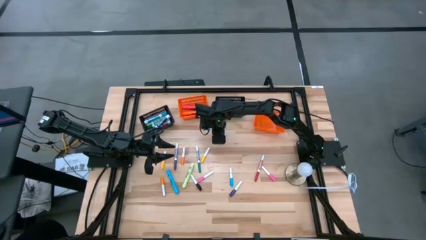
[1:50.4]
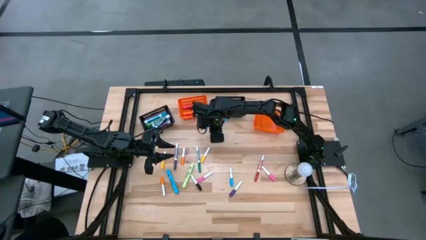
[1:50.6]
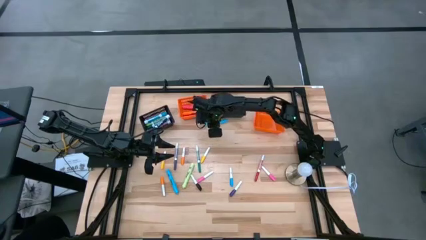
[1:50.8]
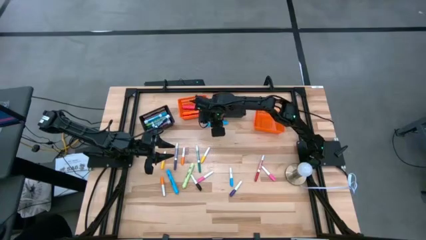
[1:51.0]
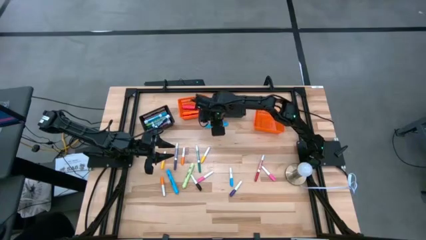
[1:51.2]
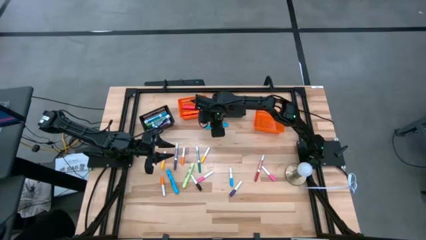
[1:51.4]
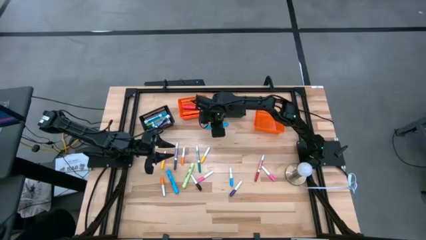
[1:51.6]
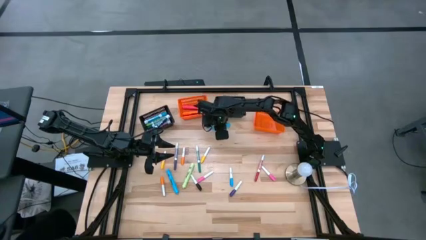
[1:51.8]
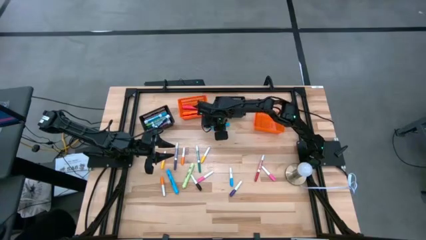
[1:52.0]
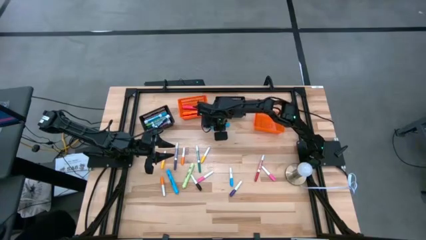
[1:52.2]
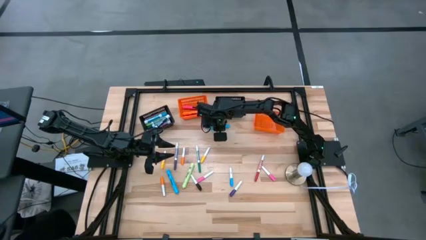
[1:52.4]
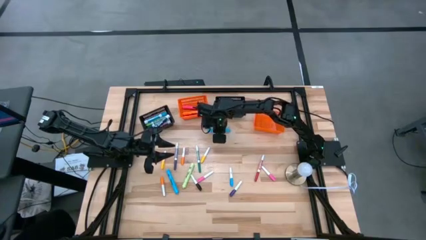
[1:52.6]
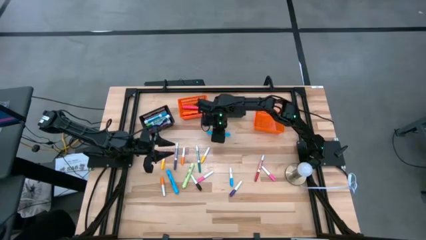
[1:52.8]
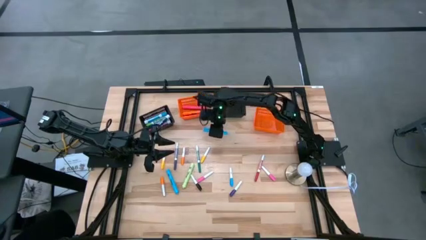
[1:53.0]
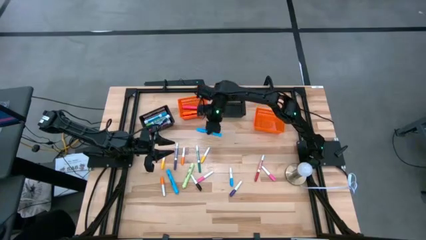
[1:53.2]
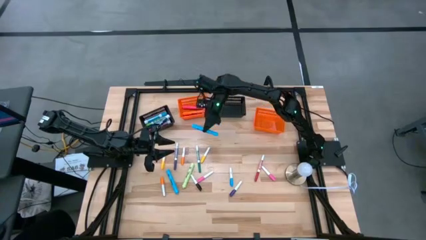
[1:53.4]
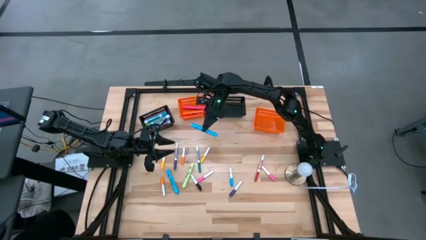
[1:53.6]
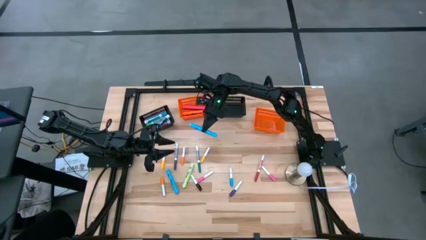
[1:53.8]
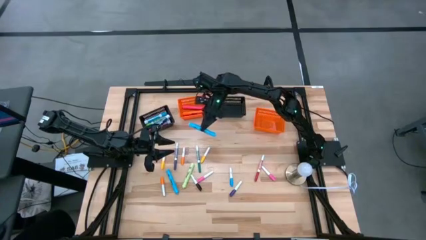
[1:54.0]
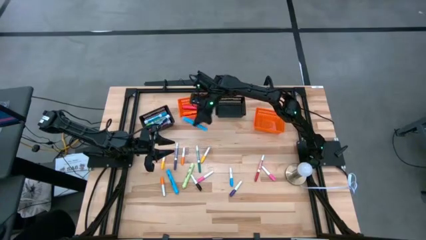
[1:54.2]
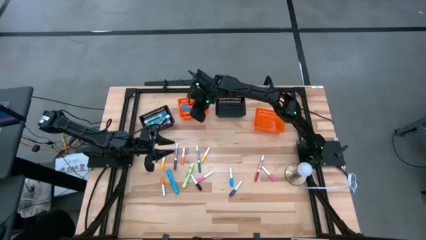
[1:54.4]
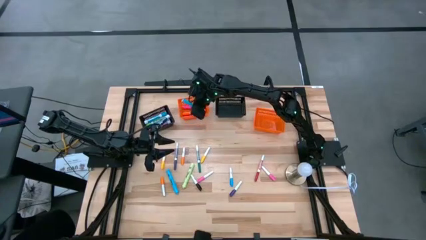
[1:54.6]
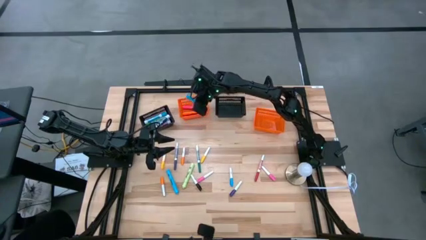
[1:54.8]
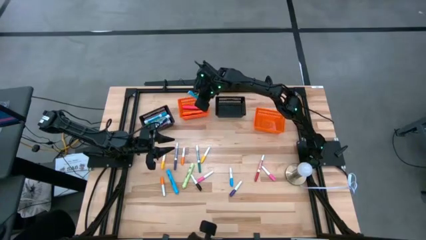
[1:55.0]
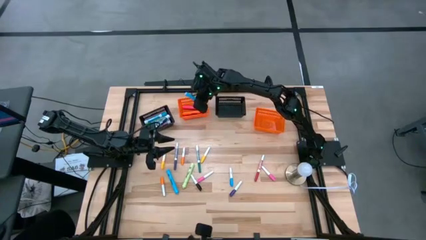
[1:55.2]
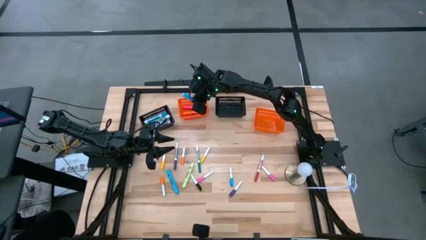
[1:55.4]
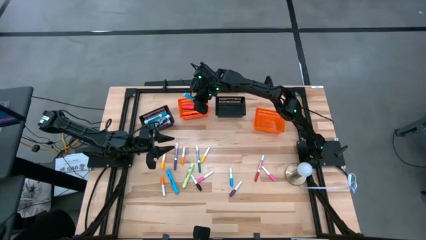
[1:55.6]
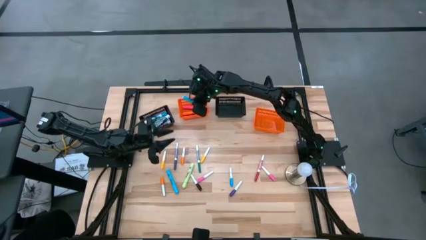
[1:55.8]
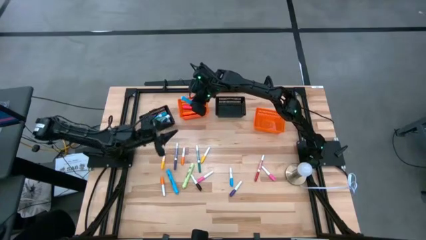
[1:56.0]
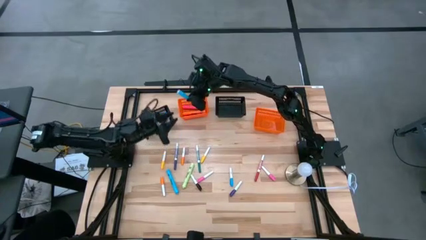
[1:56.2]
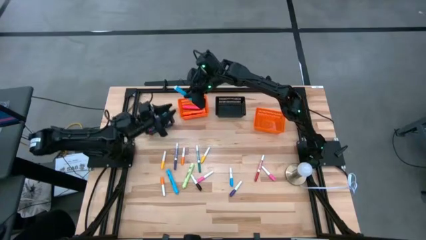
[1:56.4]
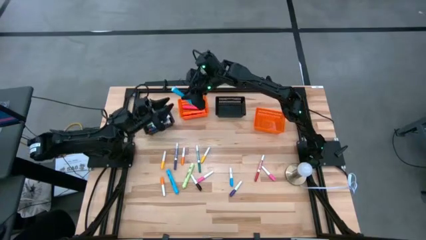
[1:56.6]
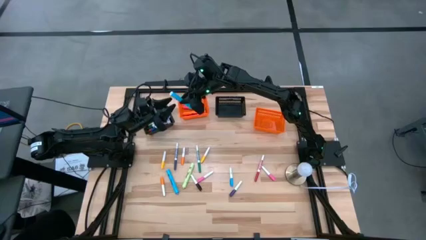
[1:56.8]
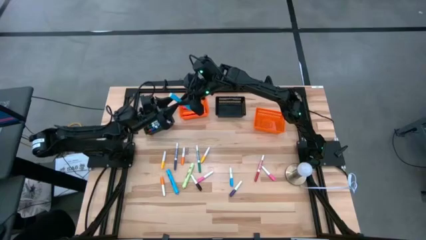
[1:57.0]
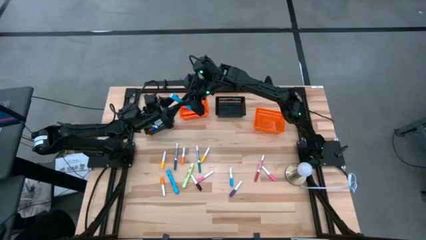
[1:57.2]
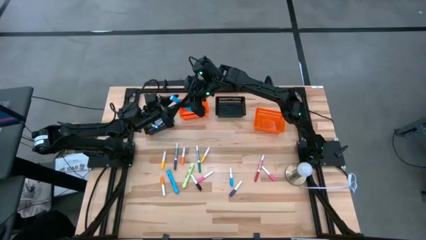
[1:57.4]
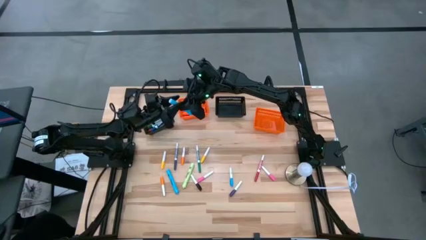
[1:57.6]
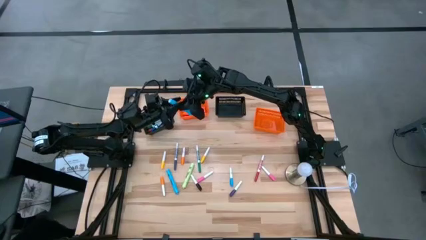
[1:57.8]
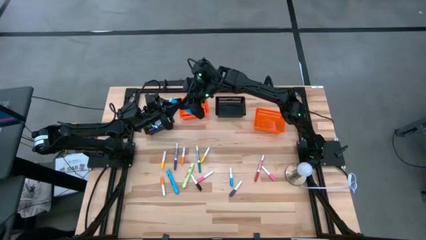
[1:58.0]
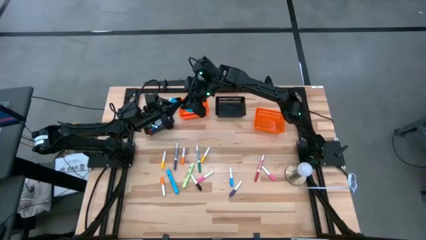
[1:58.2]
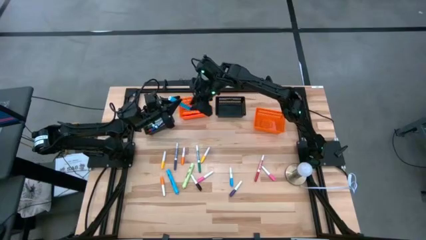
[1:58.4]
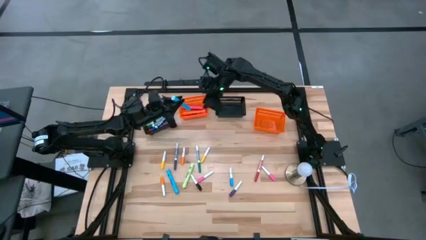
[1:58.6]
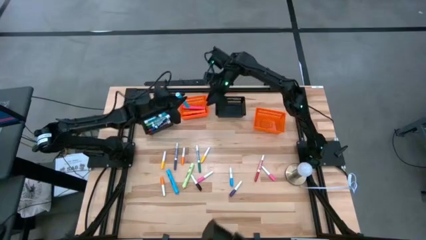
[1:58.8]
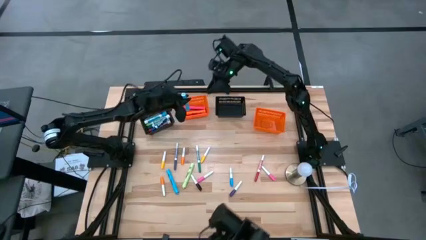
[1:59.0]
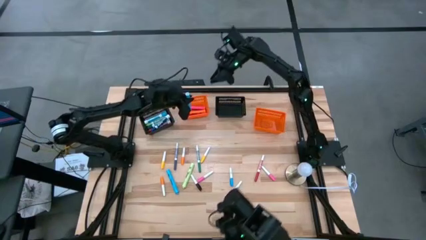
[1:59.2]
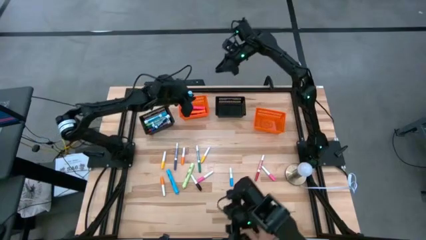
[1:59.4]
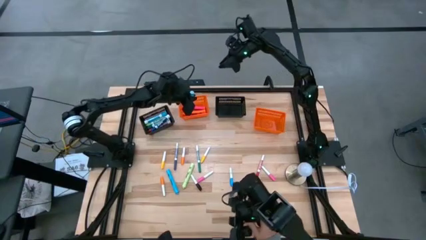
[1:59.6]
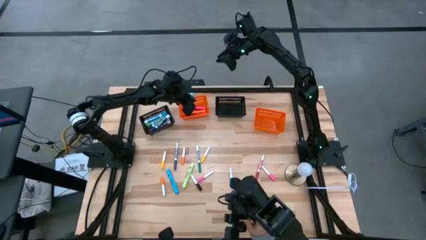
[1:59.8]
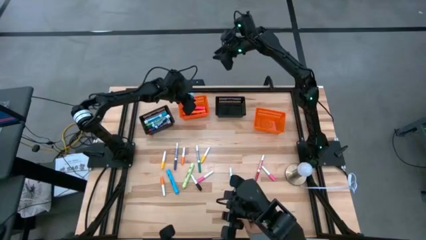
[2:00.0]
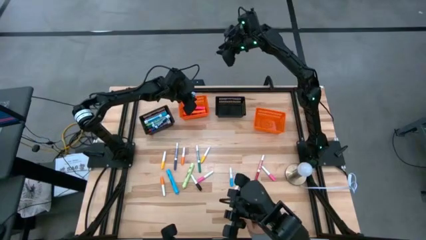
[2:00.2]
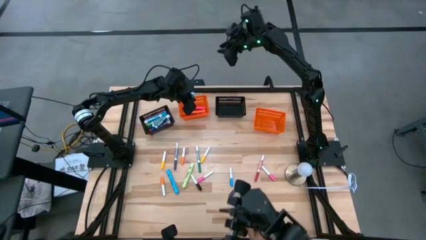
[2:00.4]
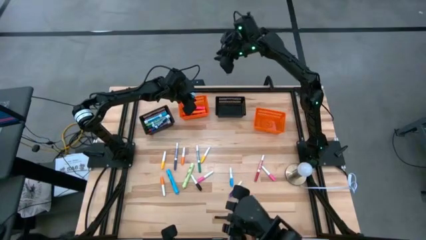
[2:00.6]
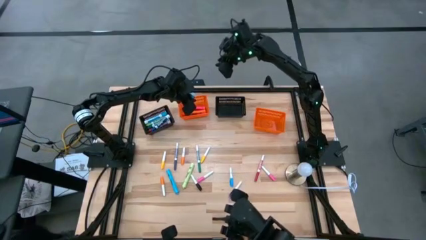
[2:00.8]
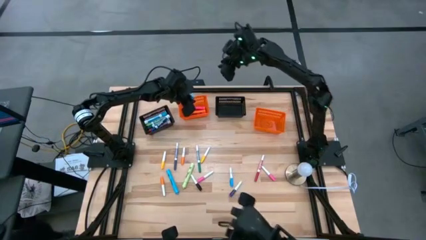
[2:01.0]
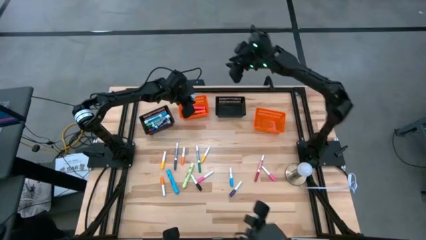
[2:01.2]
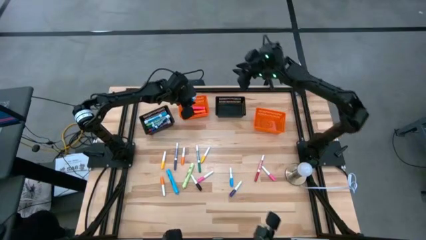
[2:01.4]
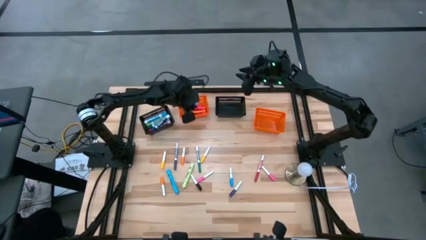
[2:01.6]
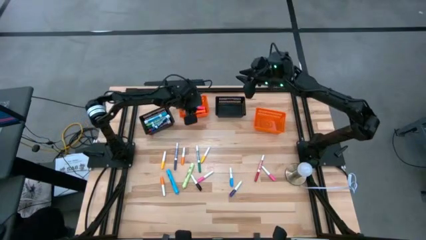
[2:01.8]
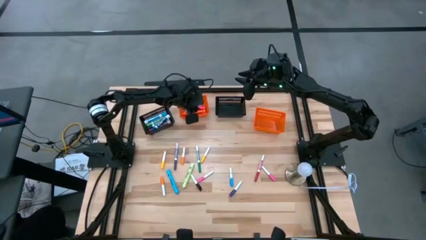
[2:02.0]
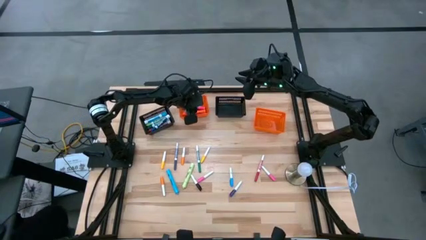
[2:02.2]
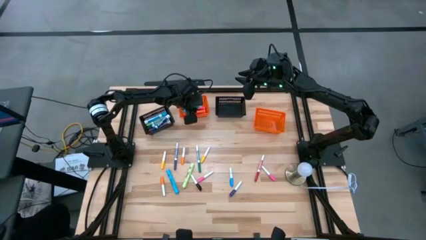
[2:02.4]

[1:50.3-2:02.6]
Task: Pick & Place Markers
Put the top large light blue highlighter pen into the left orange bin
